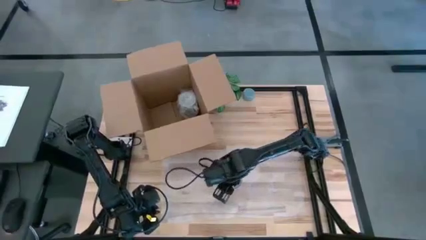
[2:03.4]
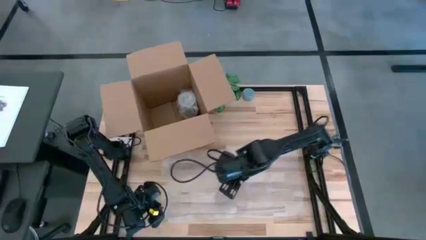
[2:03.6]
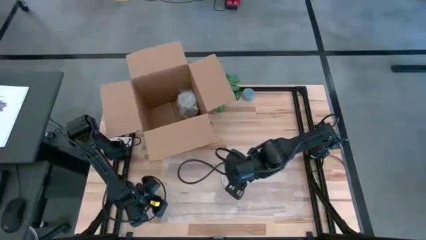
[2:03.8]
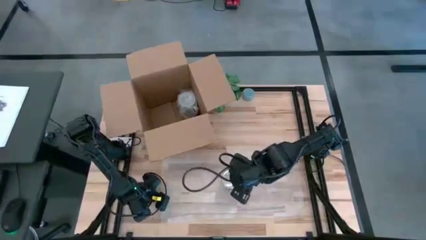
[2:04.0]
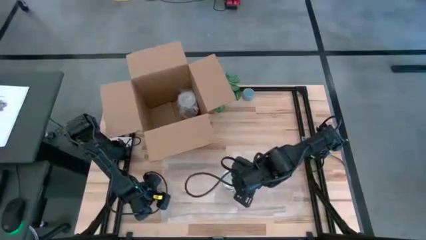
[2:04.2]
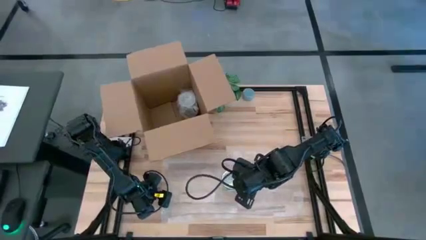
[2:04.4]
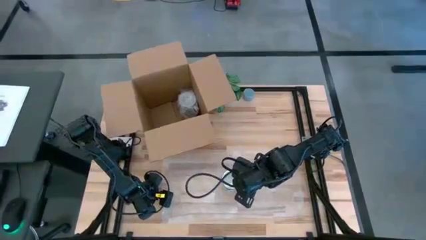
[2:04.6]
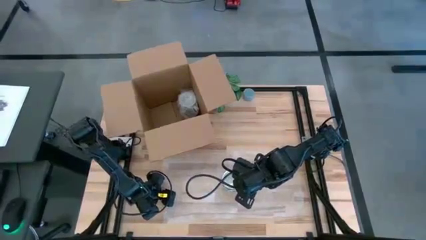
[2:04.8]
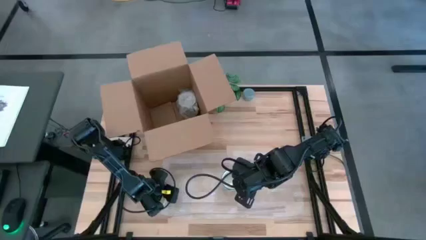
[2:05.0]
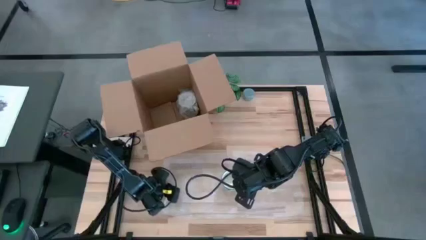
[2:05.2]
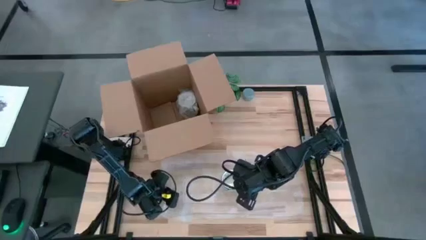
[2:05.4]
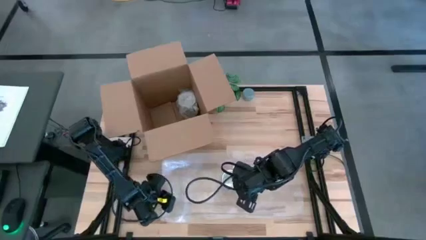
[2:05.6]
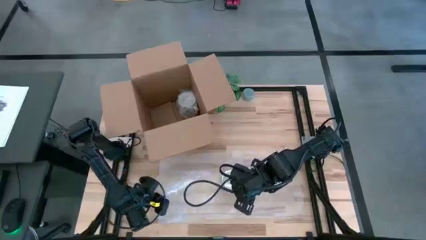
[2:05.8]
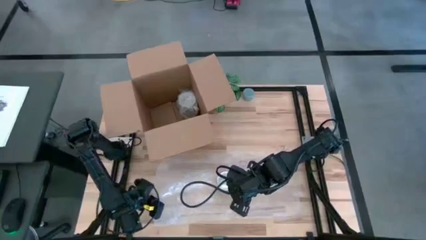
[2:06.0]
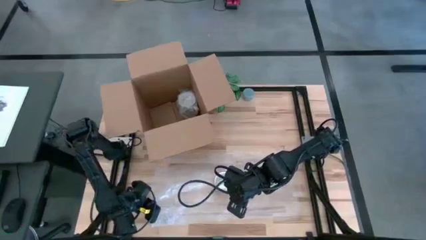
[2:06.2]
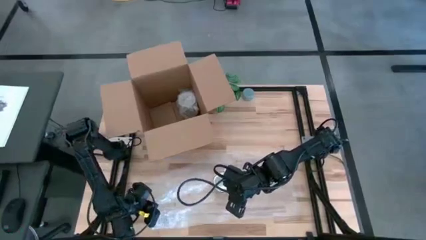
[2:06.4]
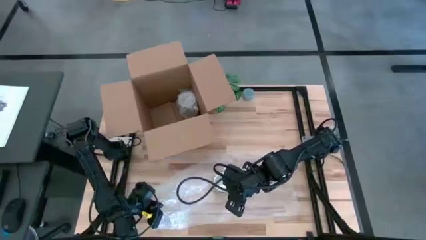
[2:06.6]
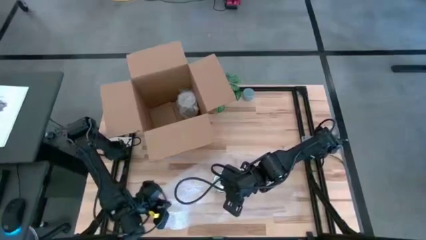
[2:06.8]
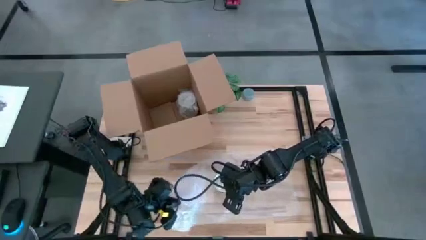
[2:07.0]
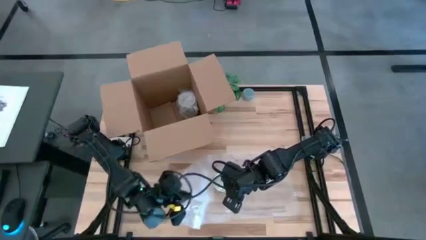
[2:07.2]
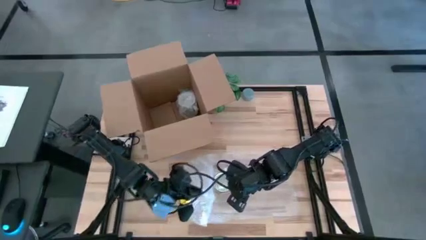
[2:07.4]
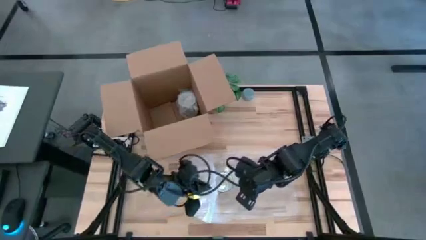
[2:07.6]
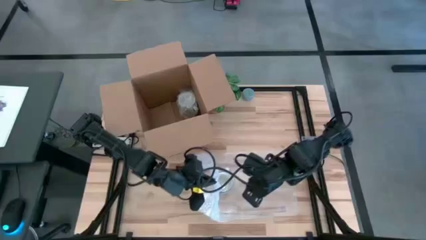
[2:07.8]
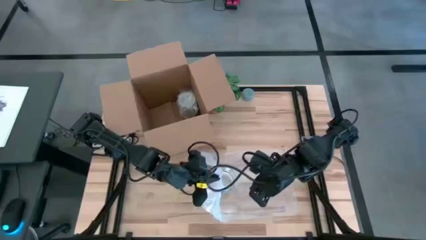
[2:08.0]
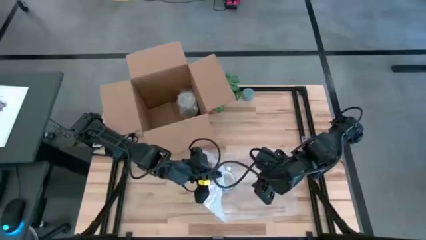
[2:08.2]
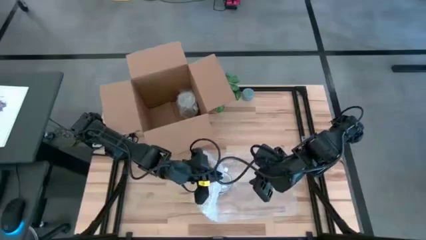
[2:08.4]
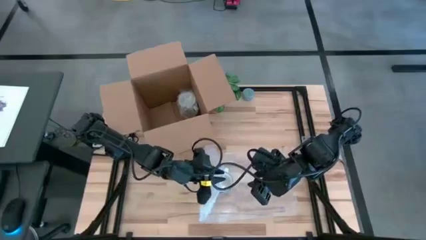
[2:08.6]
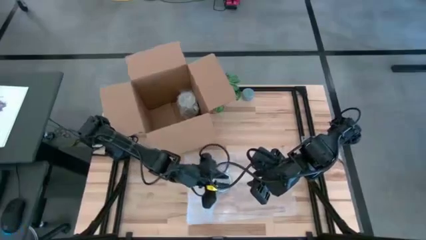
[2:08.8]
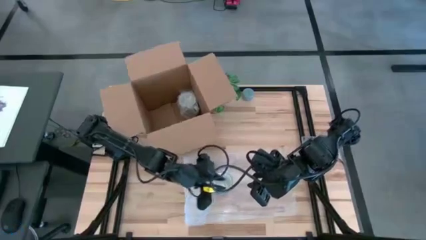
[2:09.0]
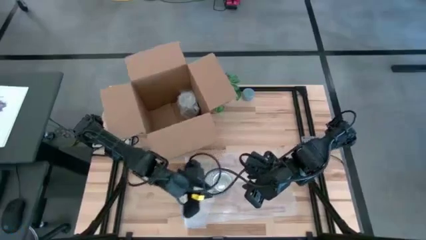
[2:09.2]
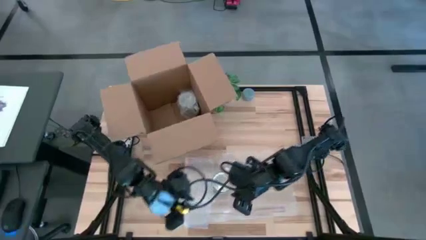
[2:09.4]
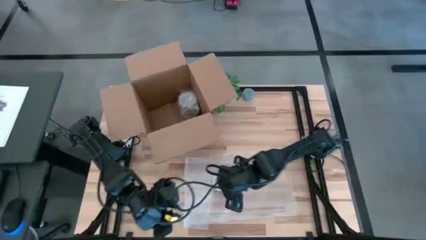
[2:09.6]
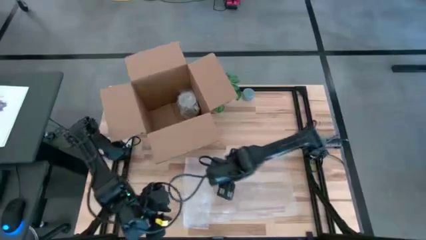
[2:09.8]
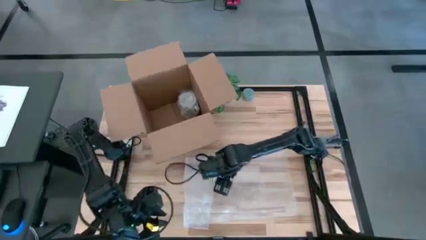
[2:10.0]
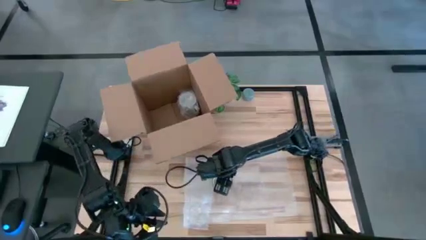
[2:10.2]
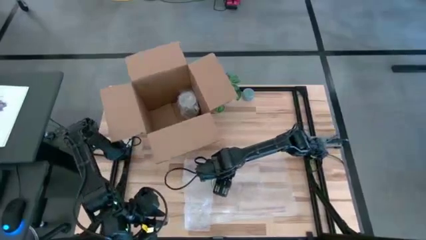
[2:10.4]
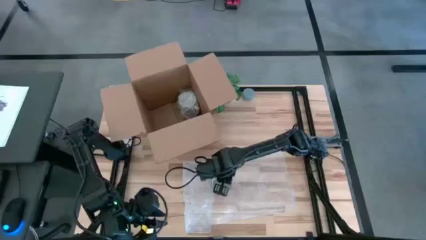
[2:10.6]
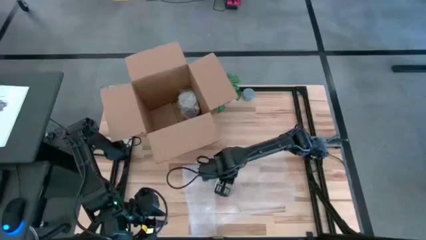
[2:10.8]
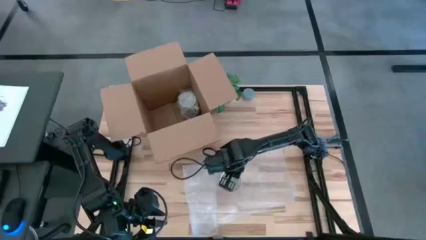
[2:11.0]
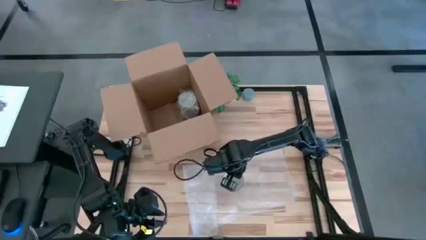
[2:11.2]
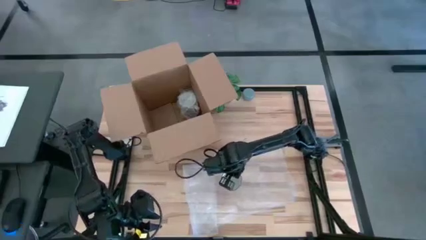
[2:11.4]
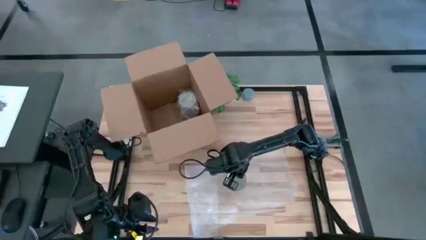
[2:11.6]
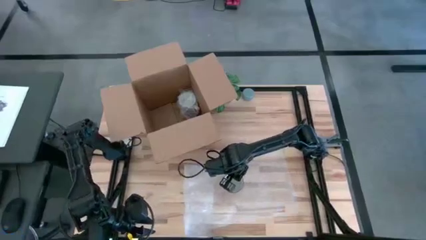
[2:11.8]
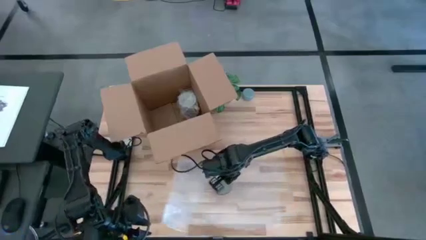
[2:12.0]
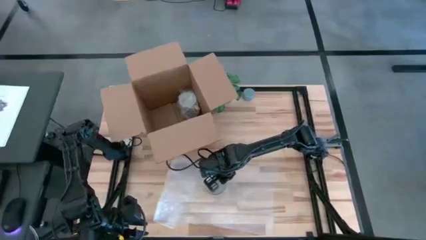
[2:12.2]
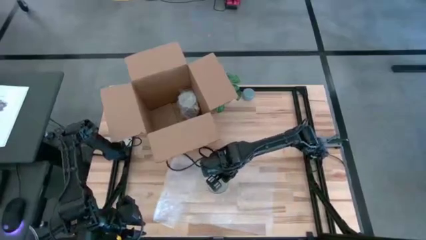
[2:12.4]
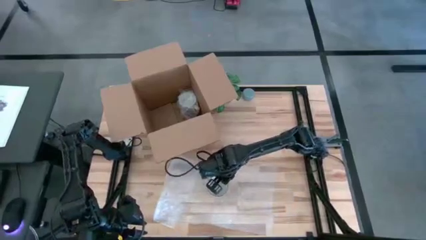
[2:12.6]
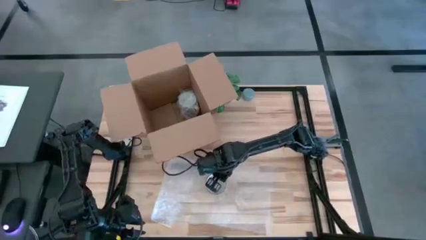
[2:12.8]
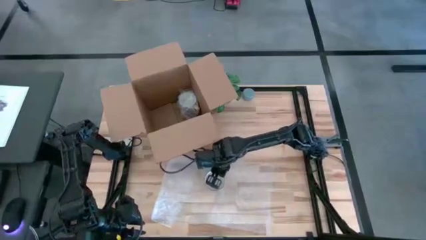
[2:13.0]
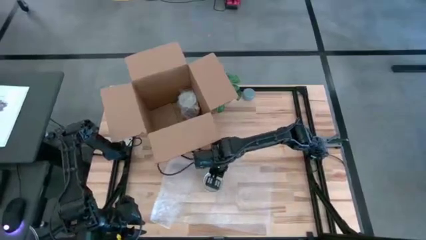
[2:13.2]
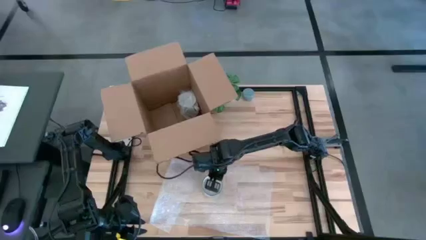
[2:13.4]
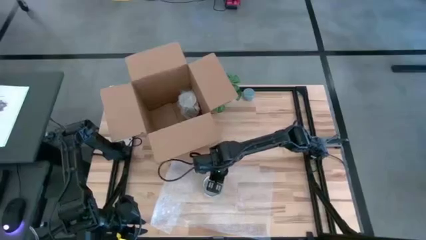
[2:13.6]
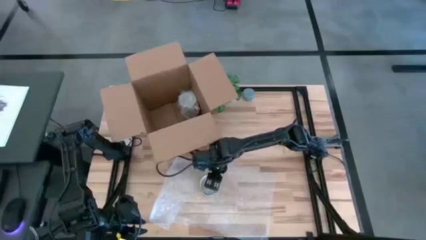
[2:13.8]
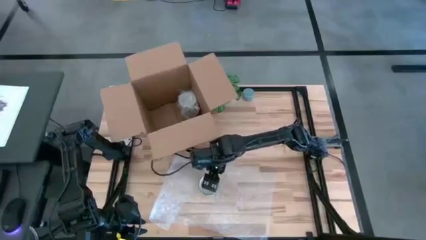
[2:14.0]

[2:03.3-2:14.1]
Task: wrap mug
Wrap the blue mug with the bubble wrap

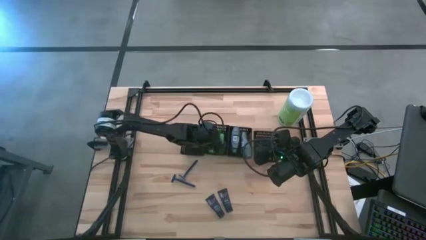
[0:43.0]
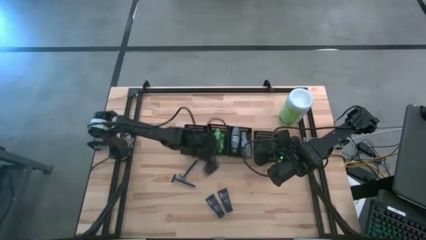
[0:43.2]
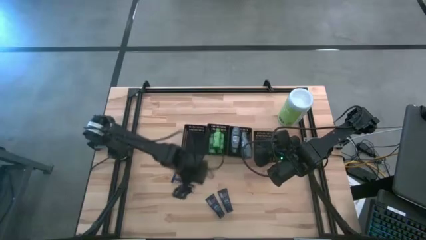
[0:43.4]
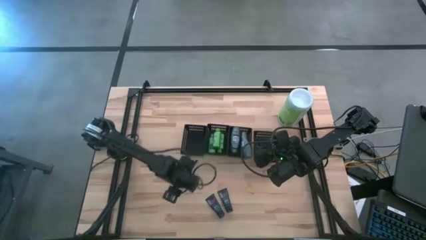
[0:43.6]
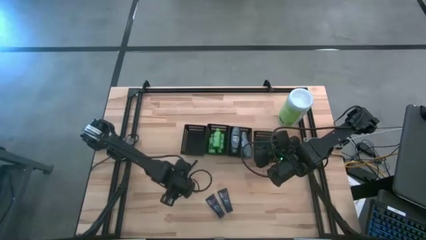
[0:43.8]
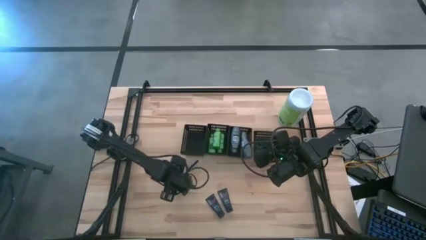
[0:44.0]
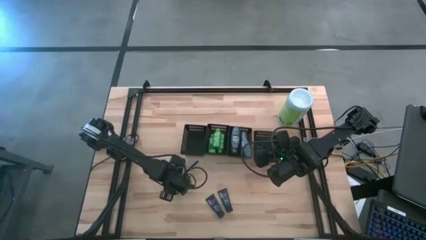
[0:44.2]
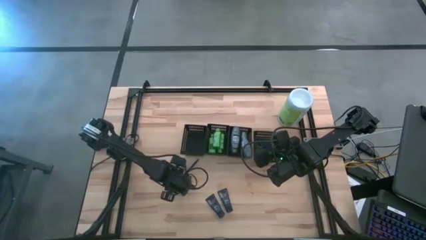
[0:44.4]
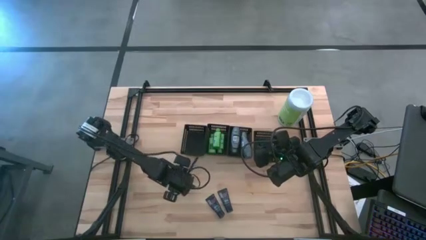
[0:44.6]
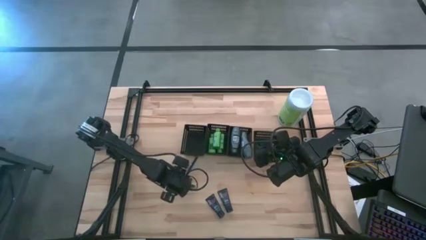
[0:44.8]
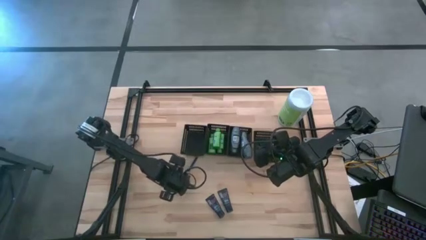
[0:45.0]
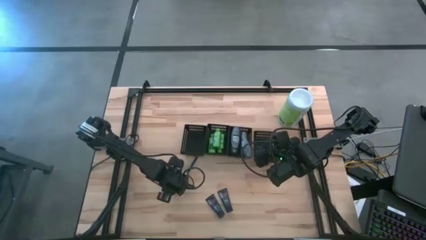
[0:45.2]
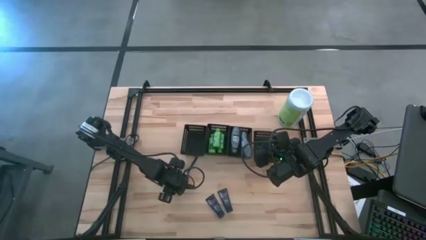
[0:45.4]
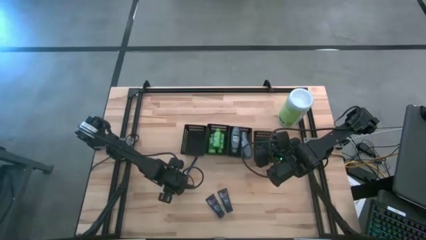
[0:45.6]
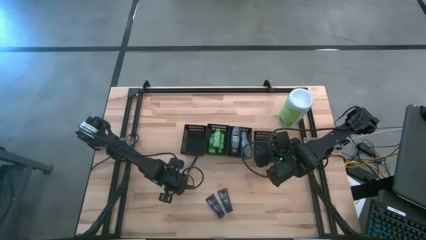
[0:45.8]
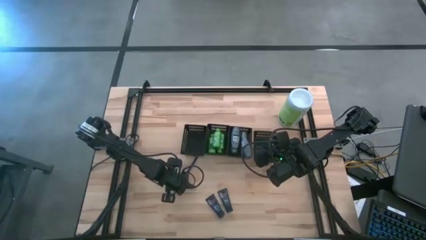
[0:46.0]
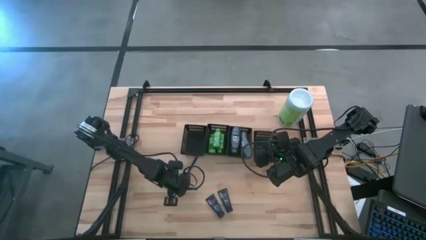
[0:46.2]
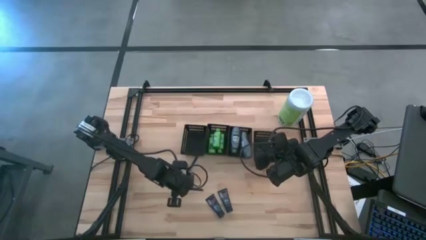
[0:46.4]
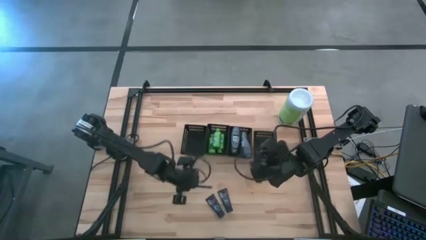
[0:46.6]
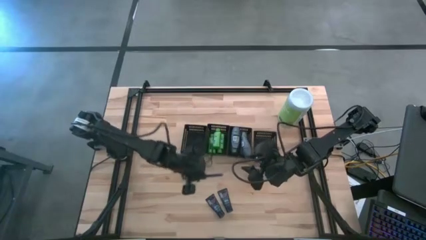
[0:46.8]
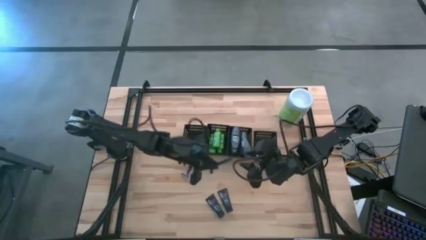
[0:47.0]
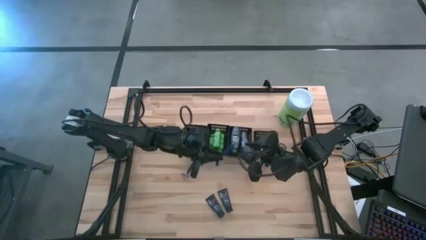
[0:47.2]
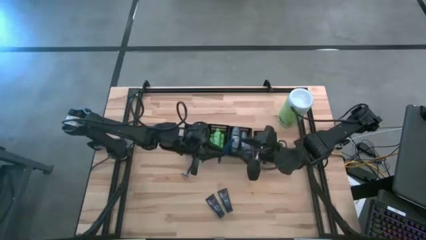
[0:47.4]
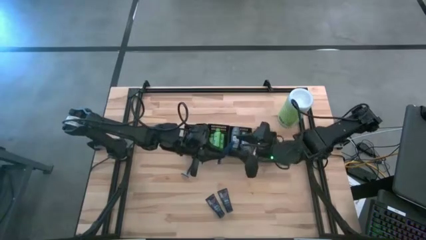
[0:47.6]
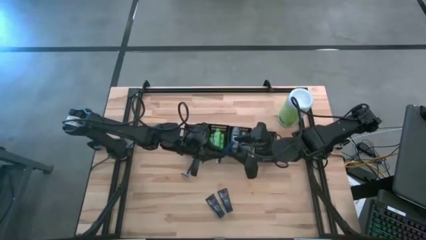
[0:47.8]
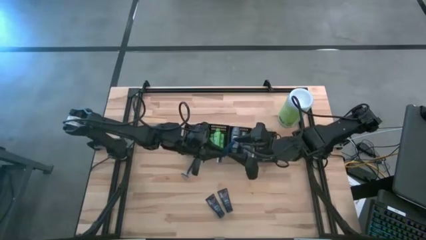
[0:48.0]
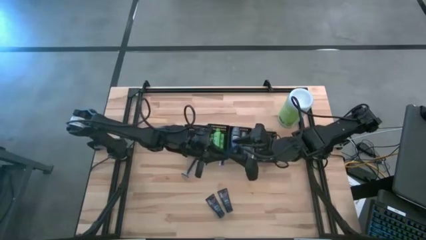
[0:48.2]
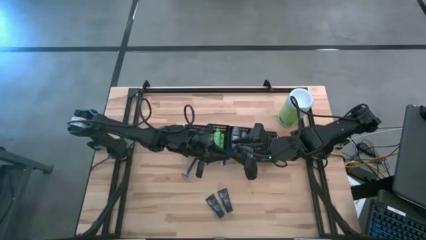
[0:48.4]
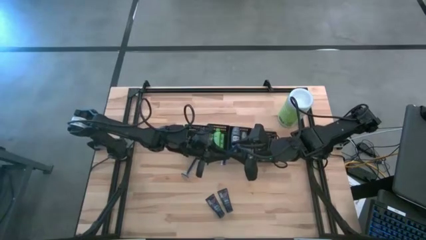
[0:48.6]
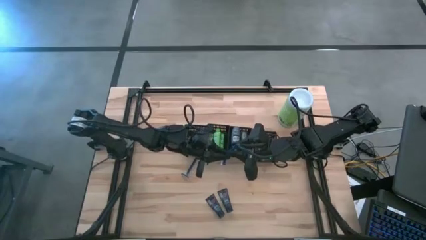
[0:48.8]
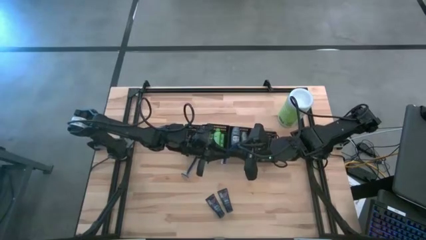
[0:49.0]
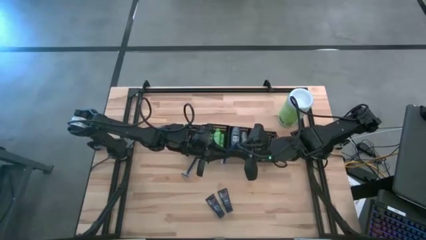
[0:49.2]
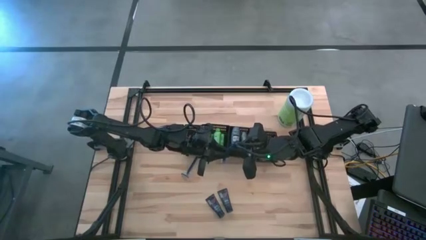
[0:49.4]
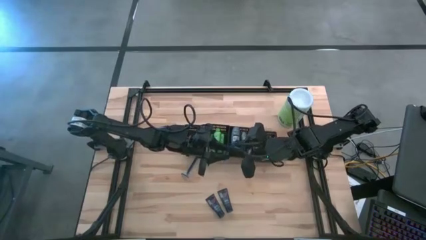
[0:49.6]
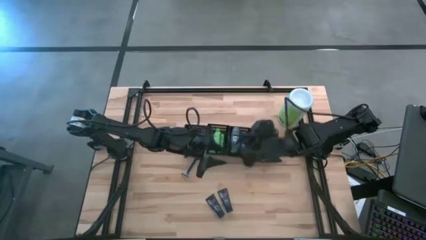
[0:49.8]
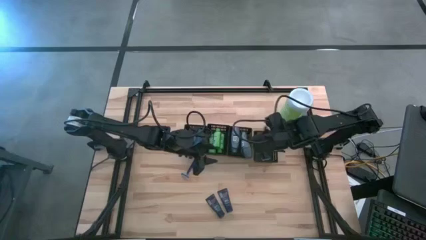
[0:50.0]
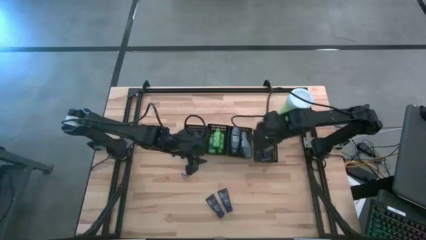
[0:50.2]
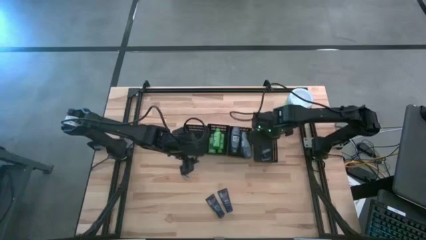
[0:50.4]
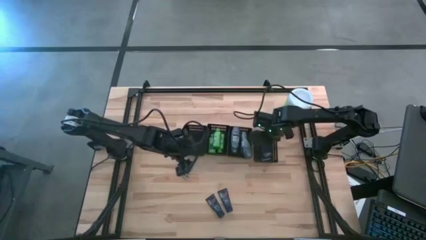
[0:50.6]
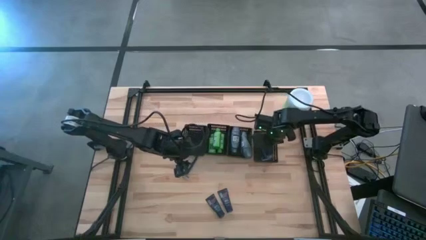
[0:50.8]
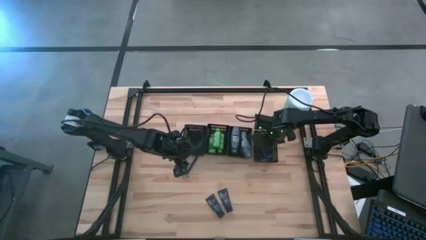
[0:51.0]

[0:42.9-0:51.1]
Task: Pick & Place Travel size toiletries
Put the razor into the right black bin
